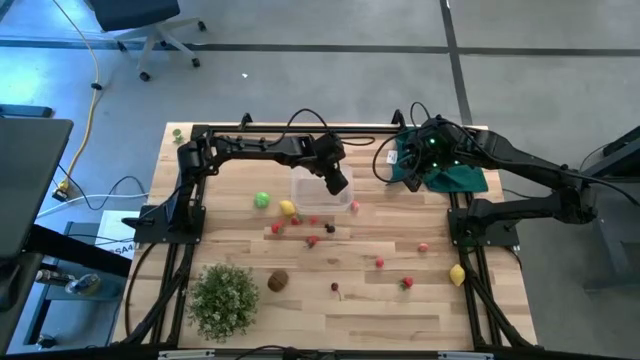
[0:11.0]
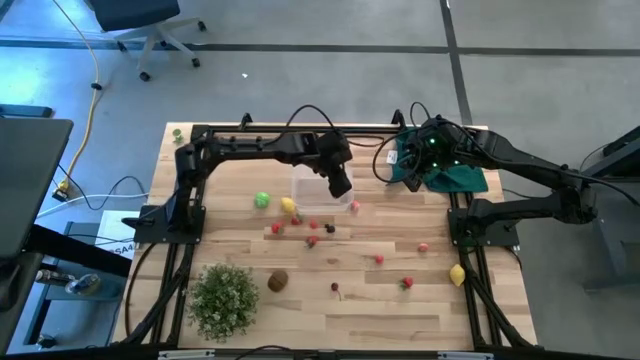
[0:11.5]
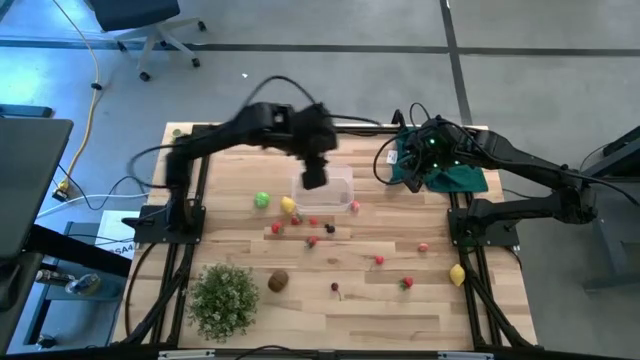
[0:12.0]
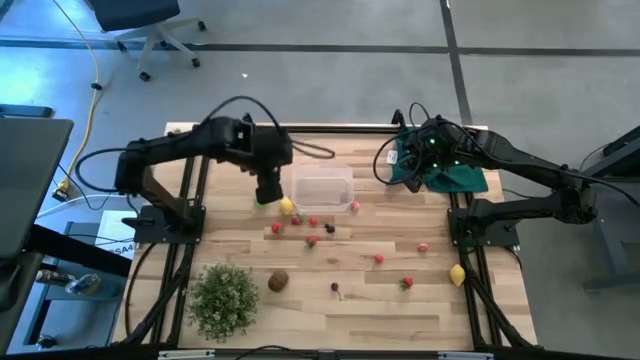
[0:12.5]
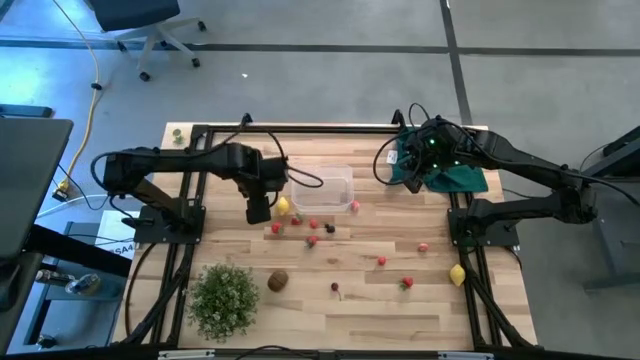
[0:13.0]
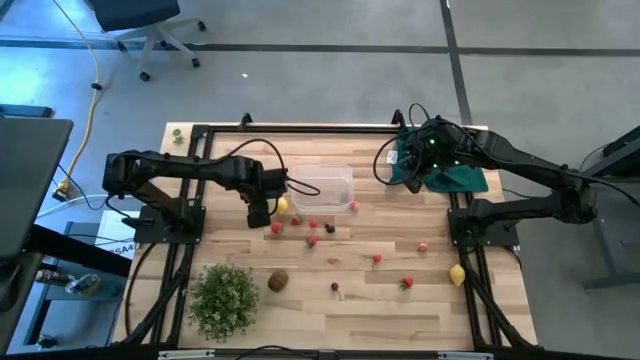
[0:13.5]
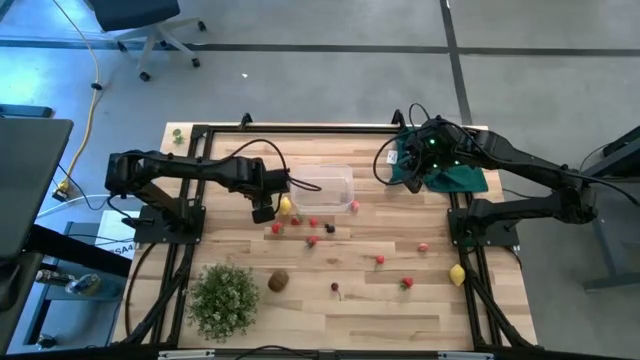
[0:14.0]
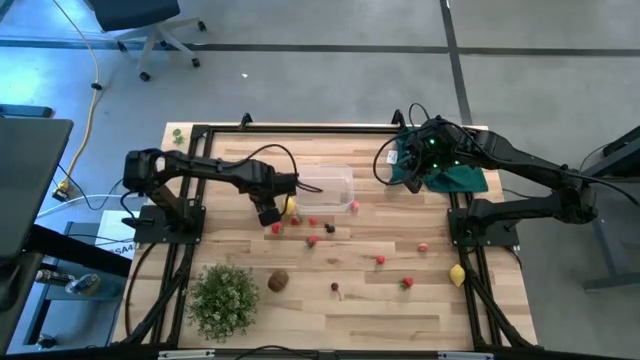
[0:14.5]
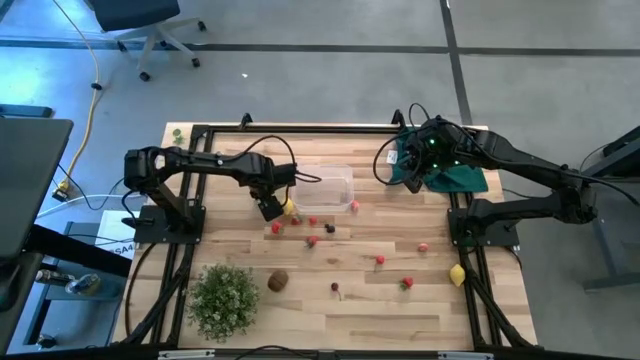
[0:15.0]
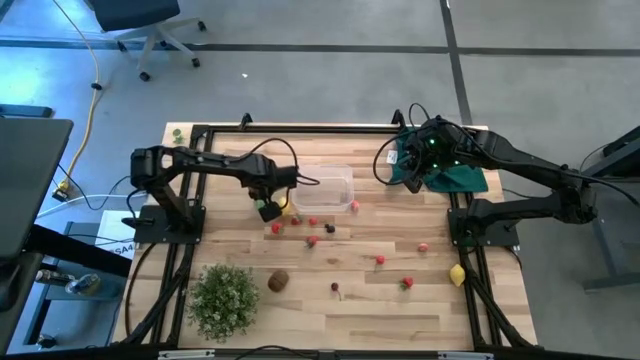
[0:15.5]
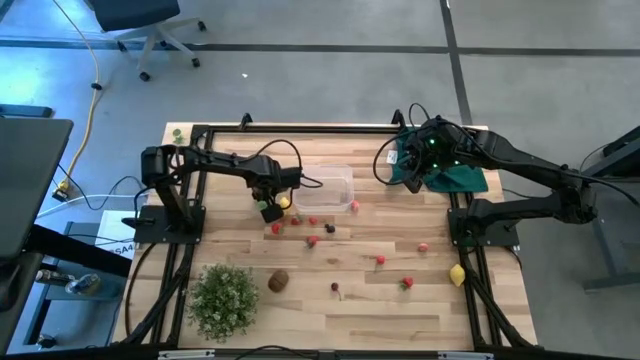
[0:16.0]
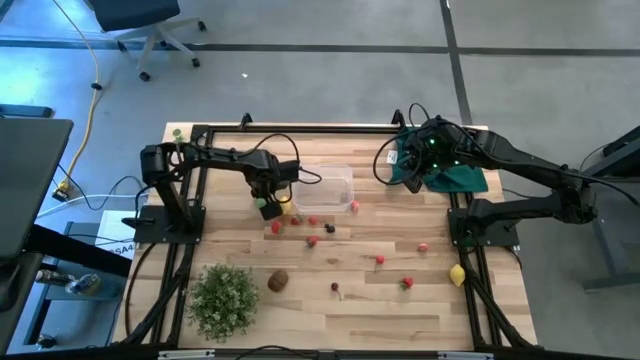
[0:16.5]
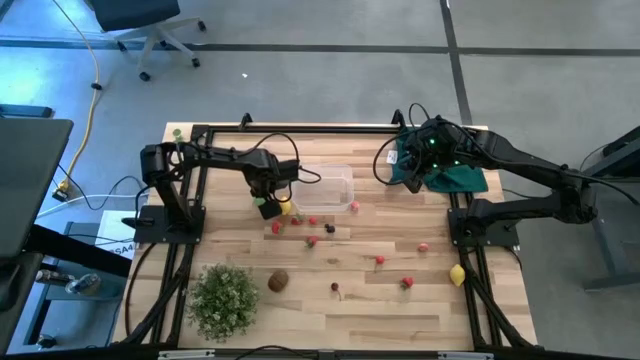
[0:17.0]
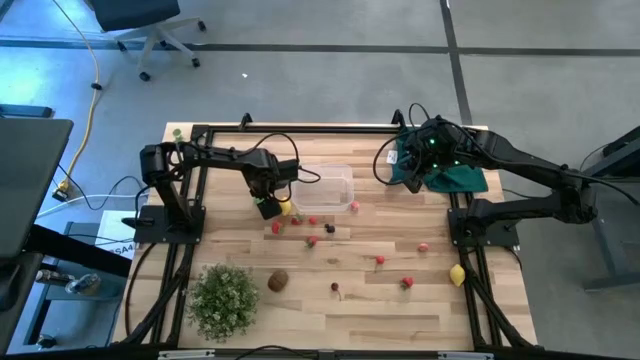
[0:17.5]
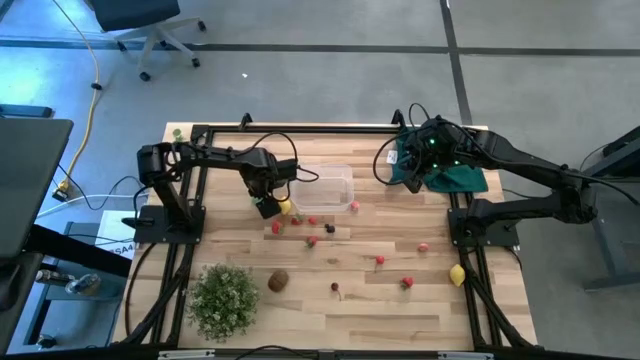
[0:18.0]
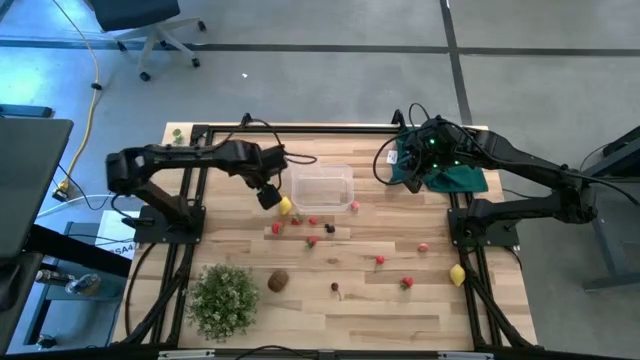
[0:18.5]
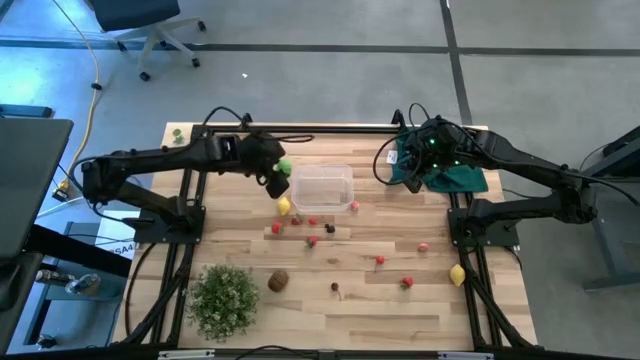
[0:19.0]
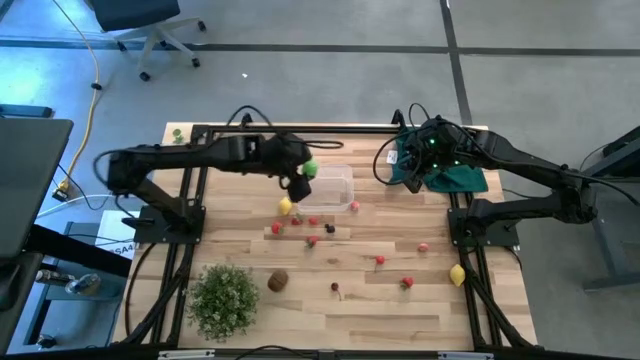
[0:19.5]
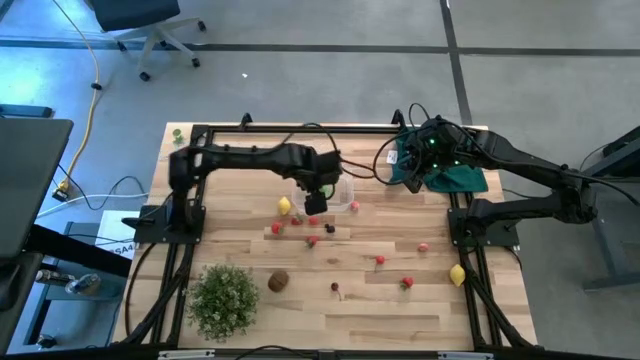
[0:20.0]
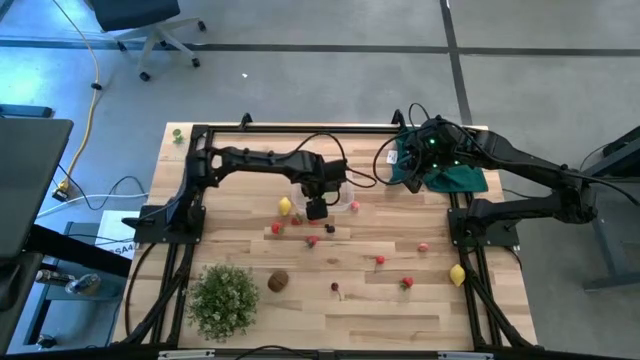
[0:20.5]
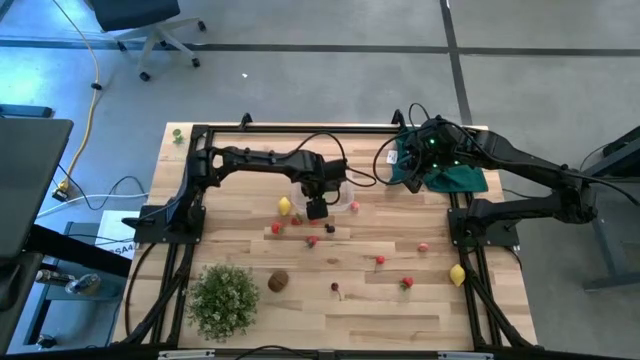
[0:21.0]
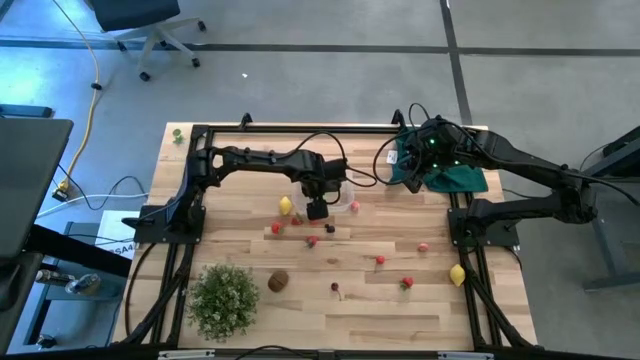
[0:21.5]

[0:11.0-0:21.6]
Task: Pick and placing Produce into tupperware
Put the green cabbage into the transparent bin

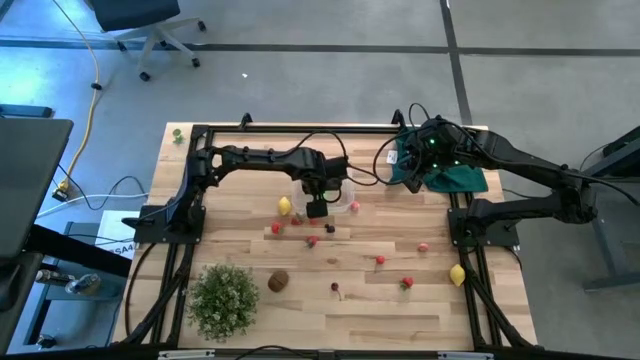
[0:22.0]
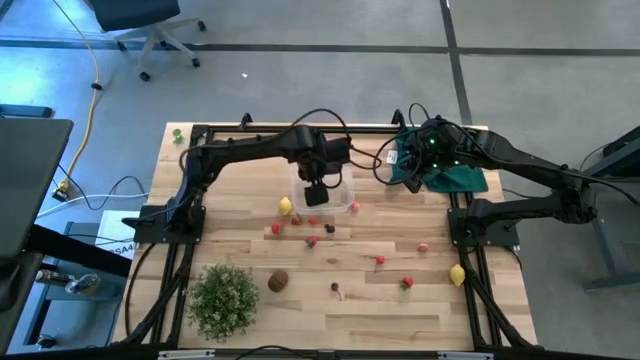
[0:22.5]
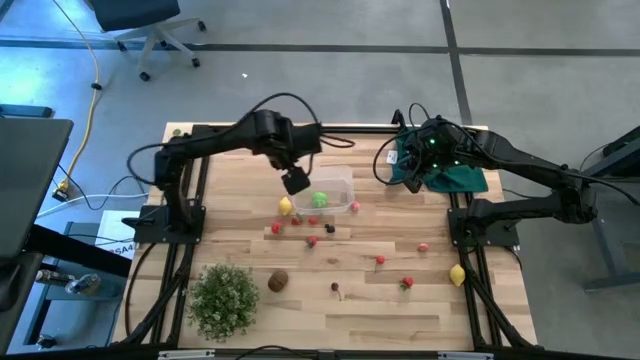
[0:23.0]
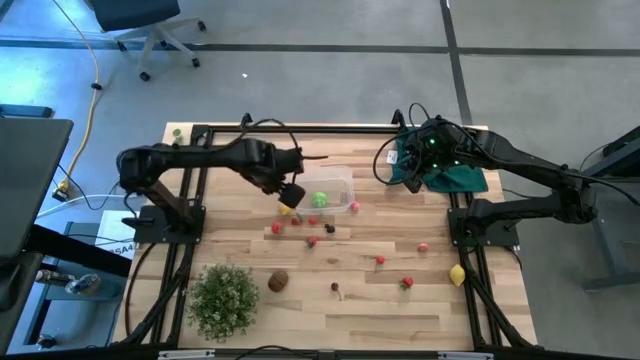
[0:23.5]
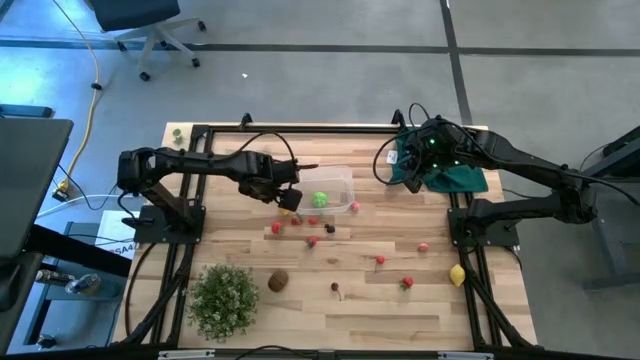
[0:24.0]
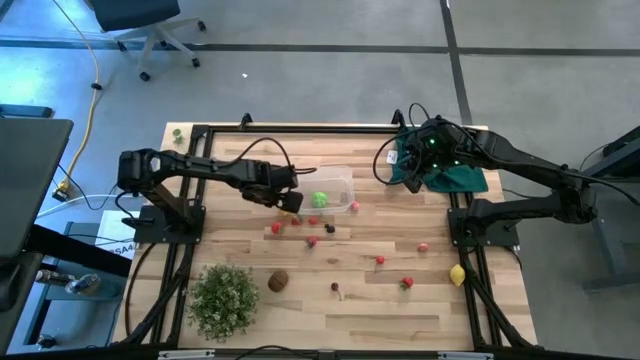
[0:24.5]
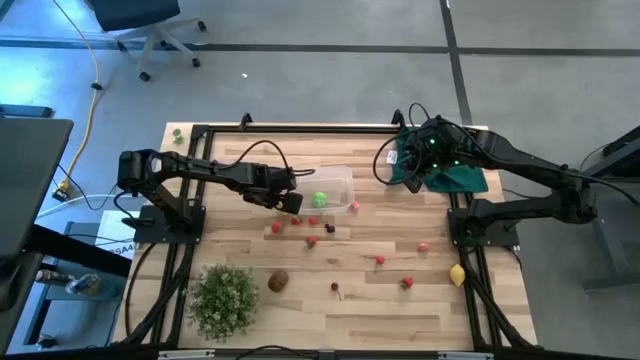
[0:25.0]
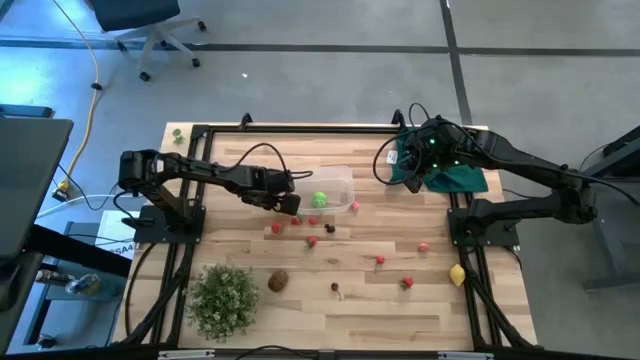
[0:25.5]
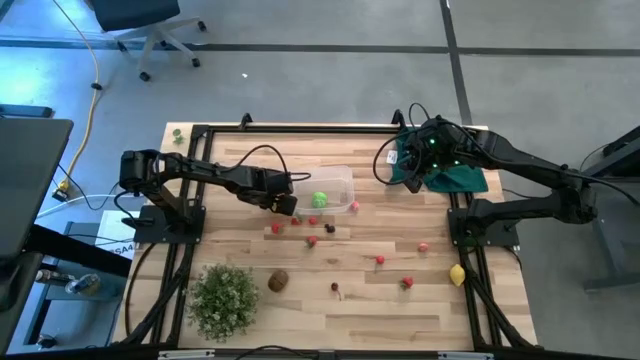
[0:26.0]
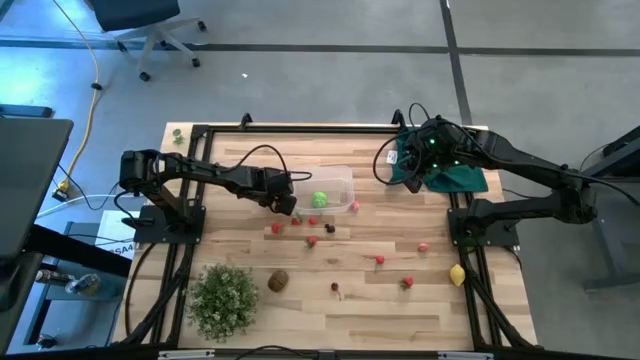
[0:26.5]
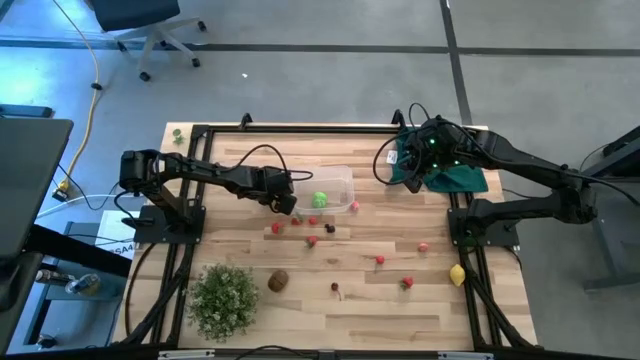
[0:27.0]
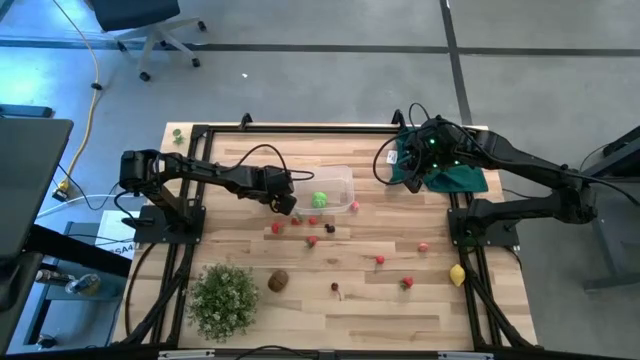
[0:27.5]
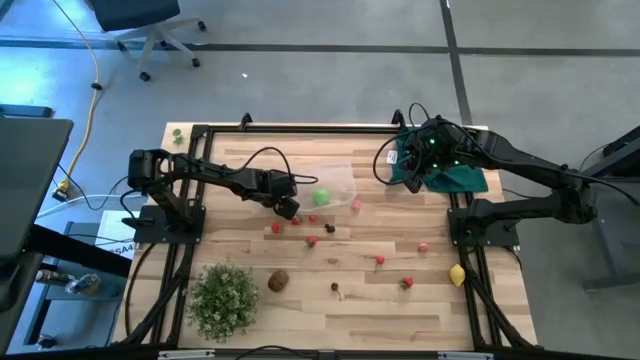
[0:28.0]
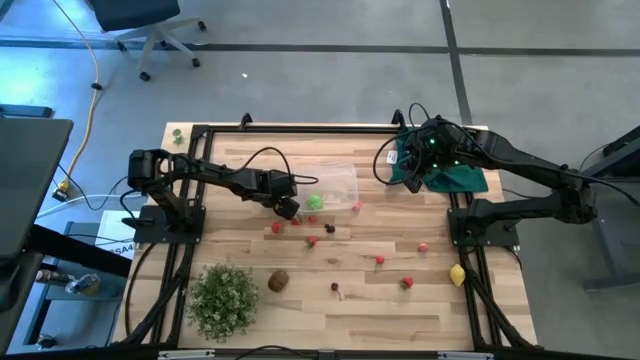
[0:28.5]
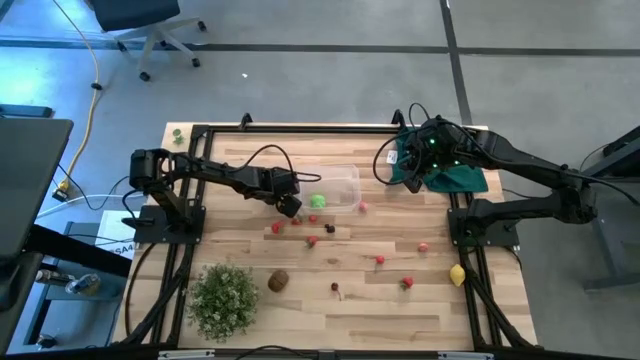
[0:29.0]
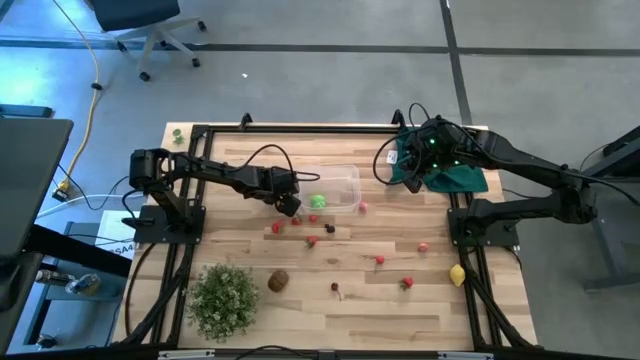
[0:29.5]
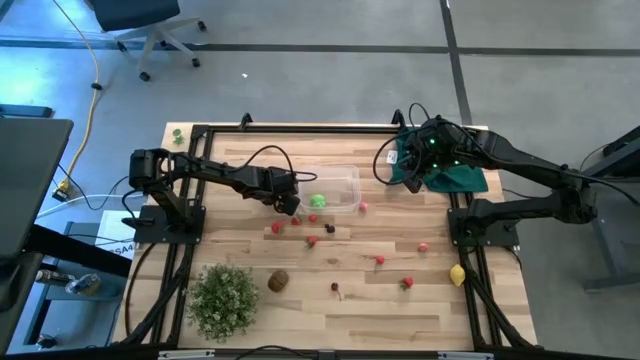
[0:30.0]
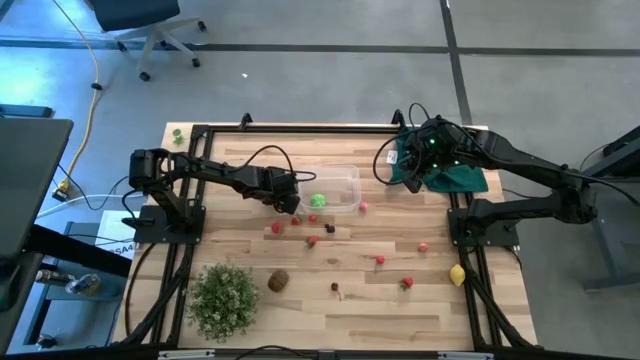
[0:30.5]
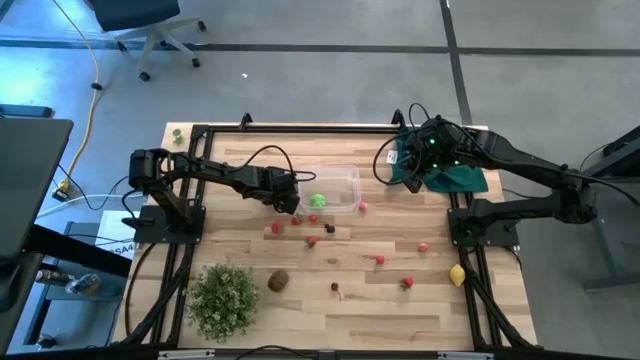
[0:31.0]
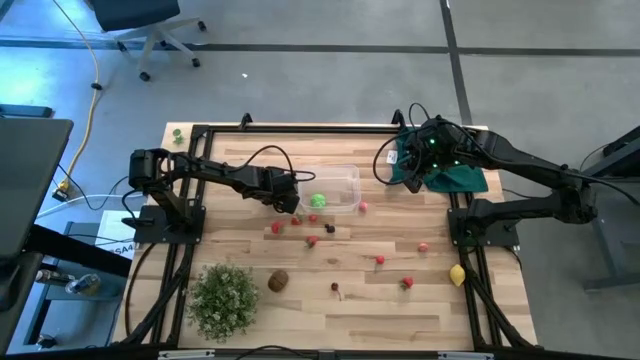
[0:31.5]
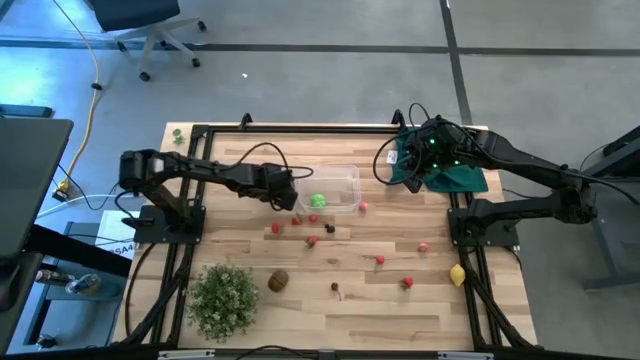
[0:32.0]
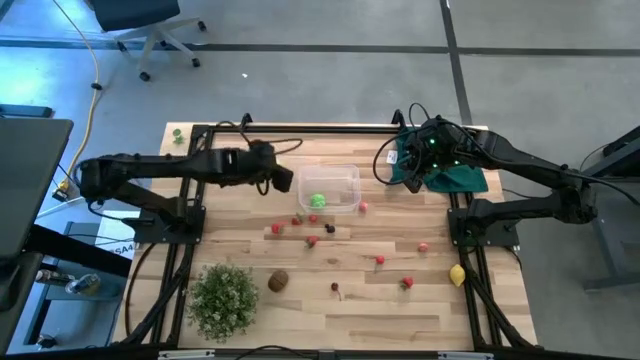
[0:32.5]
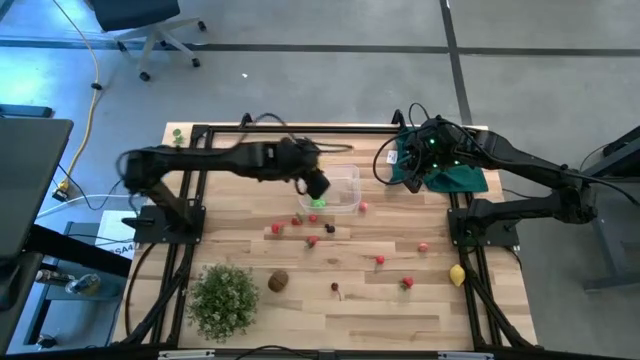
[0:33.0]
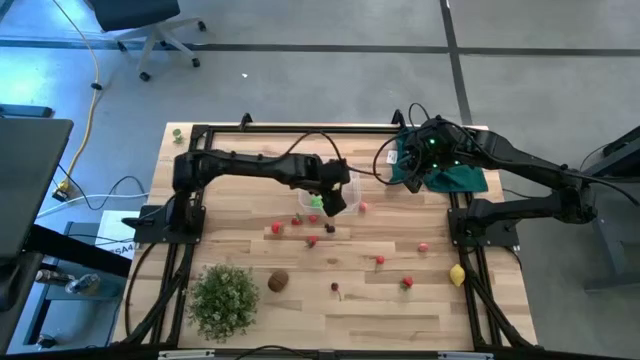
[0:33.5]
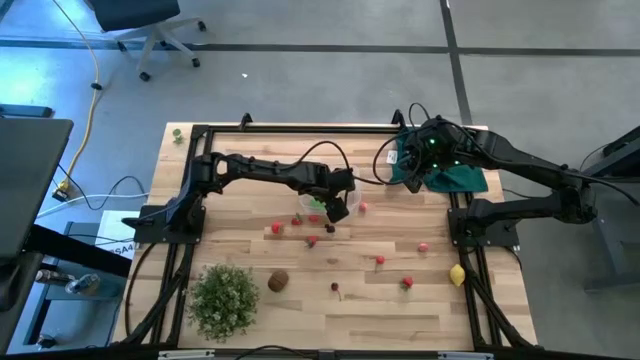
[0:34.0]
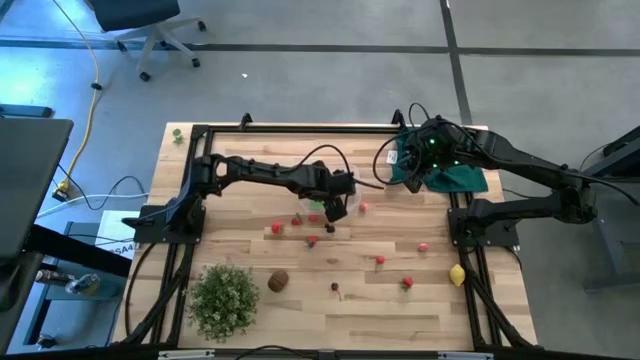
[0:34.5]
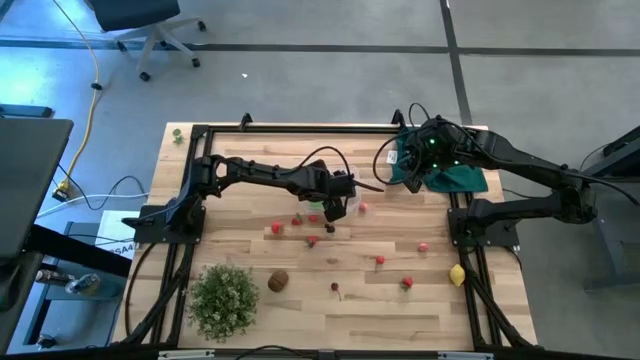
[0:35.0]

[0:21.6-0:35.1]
Put the yellow lemon into the transparent bin
